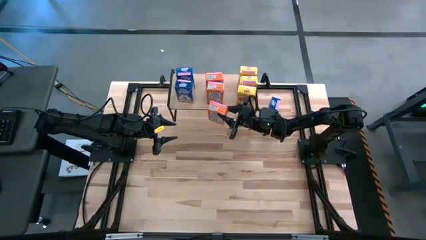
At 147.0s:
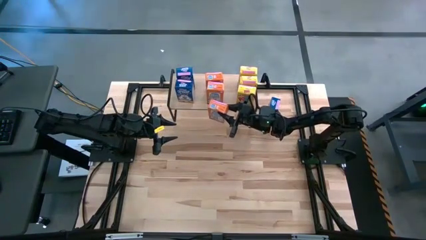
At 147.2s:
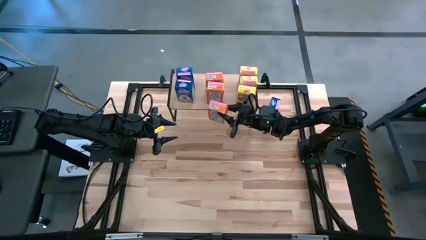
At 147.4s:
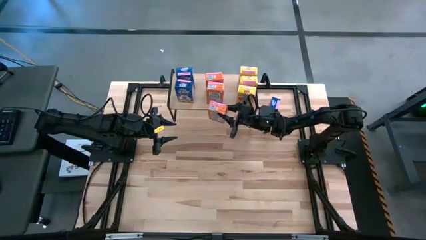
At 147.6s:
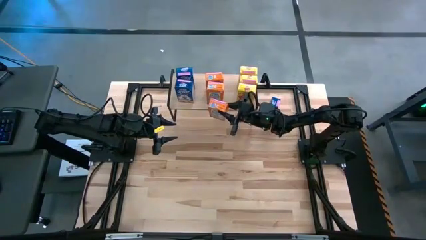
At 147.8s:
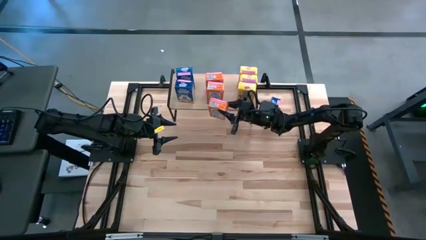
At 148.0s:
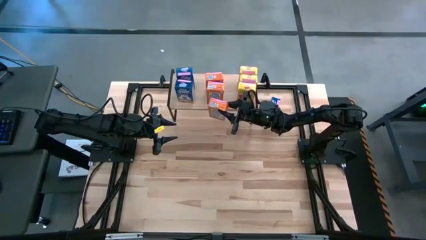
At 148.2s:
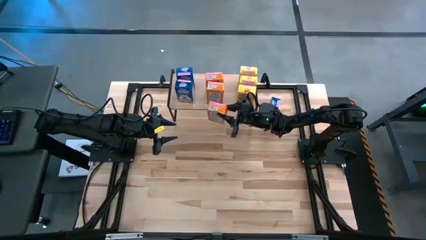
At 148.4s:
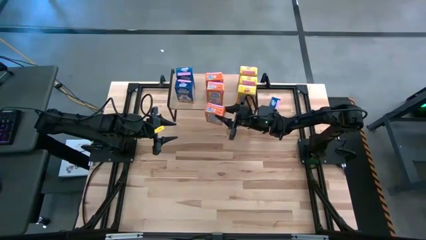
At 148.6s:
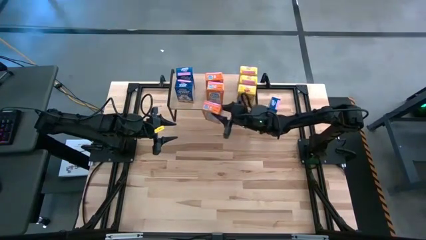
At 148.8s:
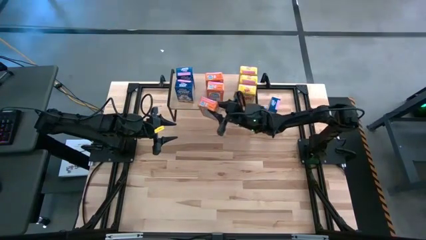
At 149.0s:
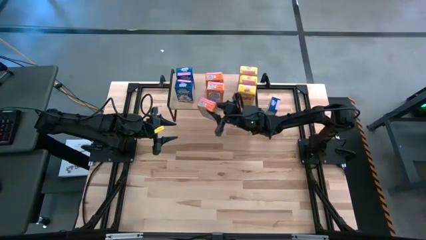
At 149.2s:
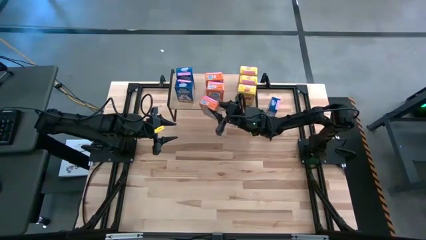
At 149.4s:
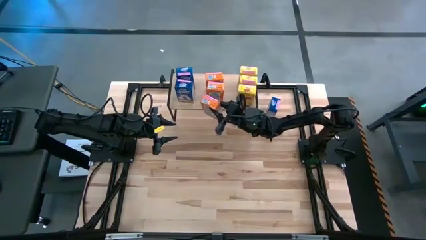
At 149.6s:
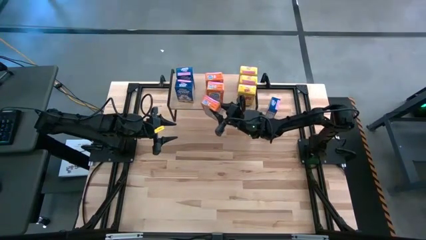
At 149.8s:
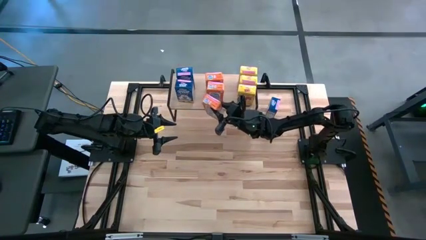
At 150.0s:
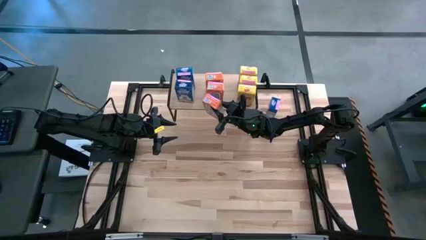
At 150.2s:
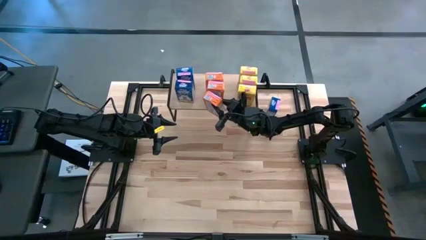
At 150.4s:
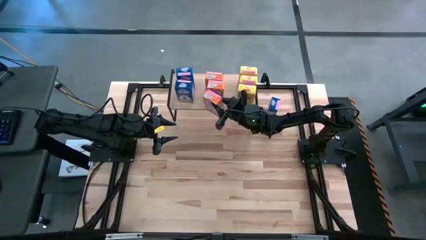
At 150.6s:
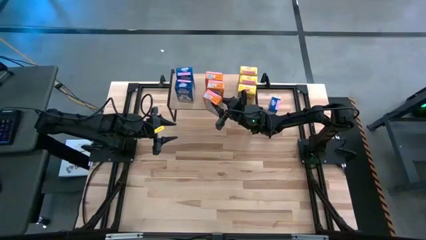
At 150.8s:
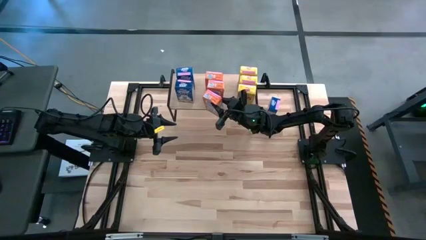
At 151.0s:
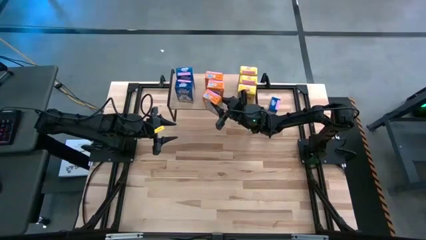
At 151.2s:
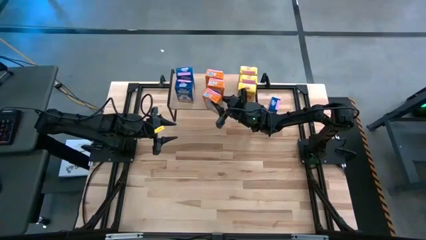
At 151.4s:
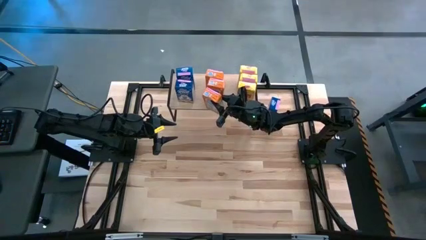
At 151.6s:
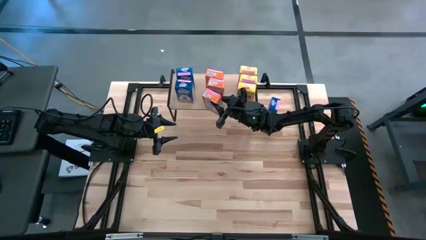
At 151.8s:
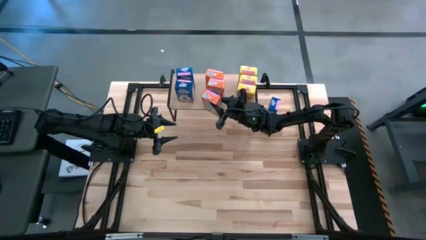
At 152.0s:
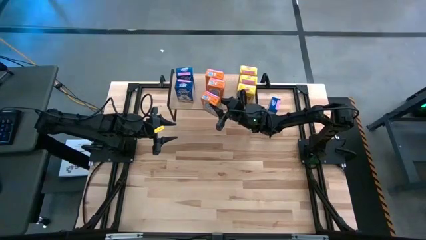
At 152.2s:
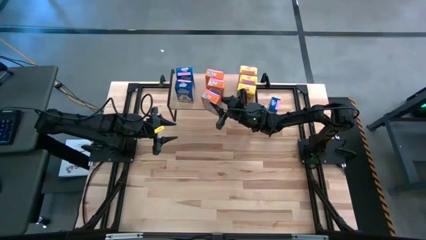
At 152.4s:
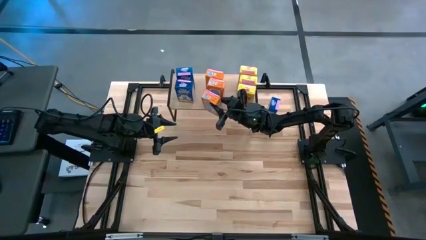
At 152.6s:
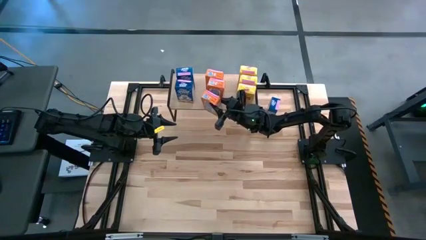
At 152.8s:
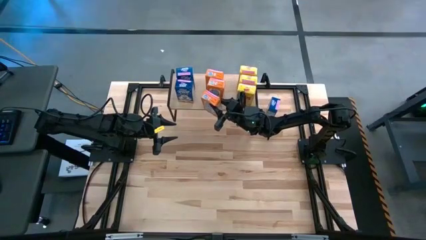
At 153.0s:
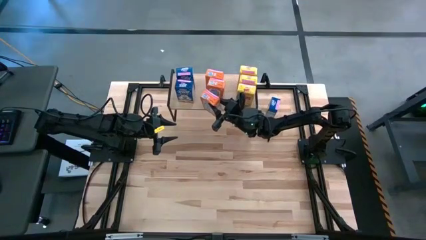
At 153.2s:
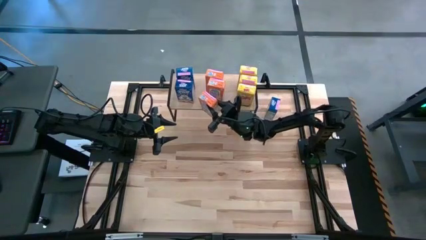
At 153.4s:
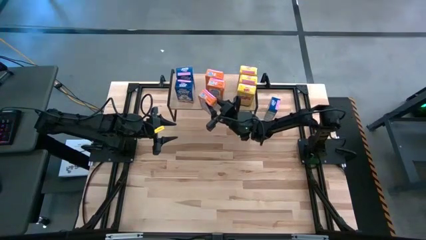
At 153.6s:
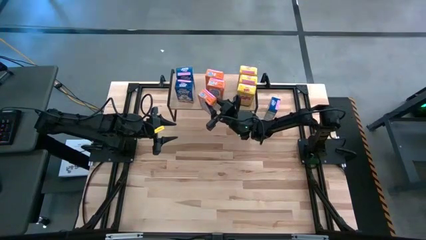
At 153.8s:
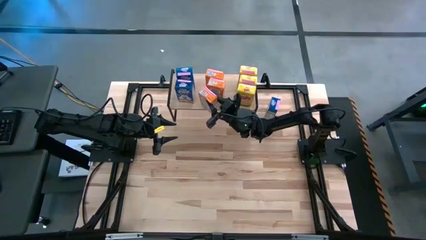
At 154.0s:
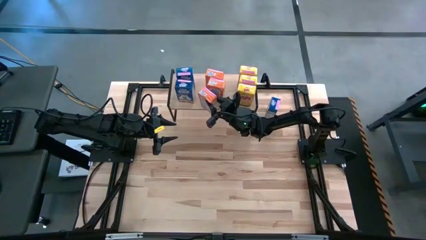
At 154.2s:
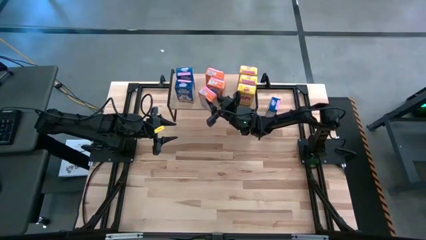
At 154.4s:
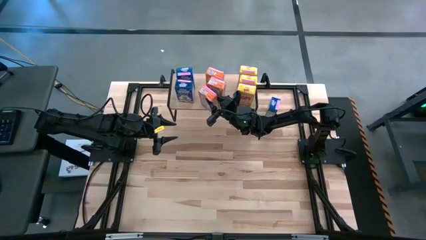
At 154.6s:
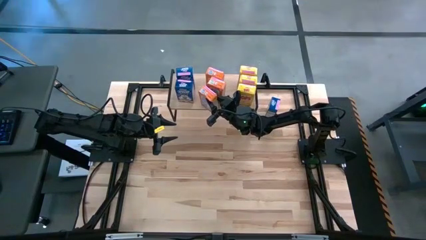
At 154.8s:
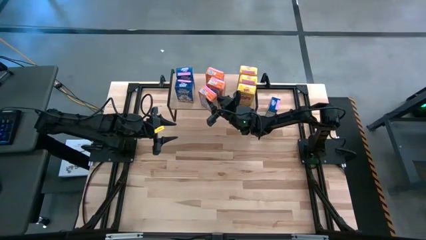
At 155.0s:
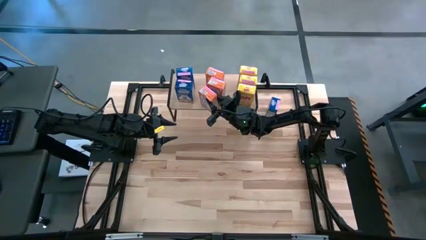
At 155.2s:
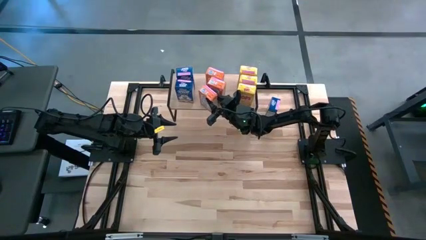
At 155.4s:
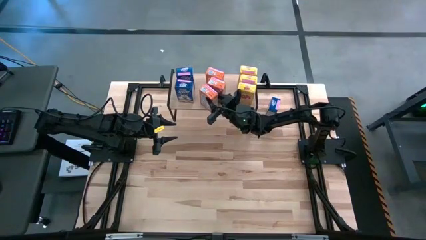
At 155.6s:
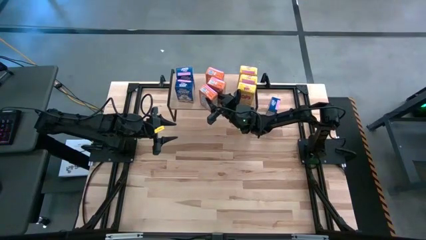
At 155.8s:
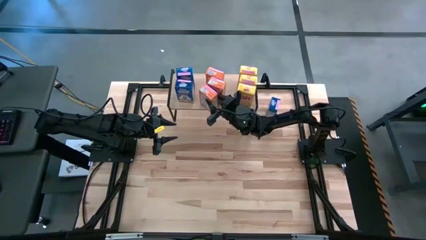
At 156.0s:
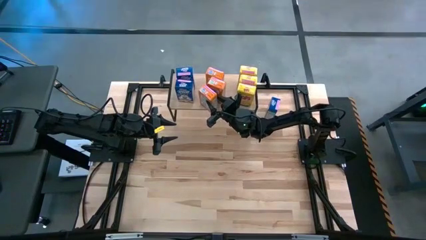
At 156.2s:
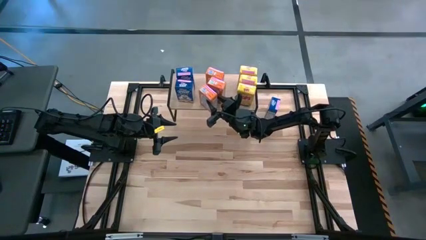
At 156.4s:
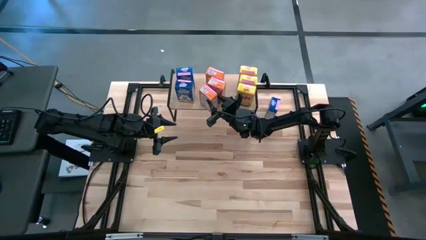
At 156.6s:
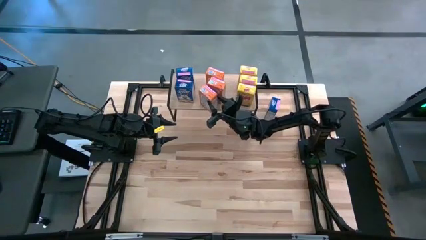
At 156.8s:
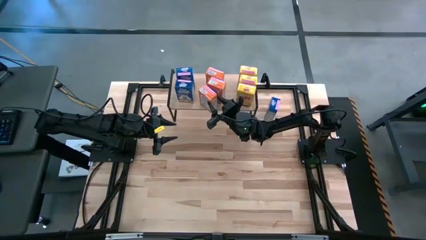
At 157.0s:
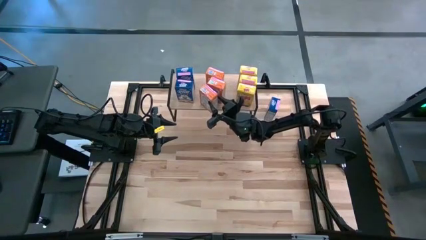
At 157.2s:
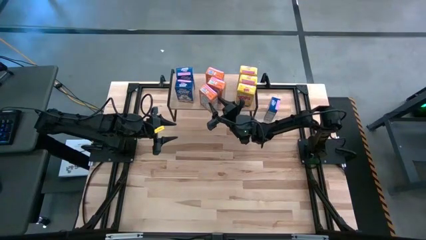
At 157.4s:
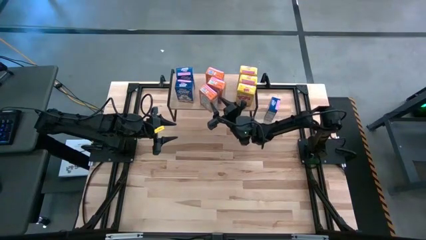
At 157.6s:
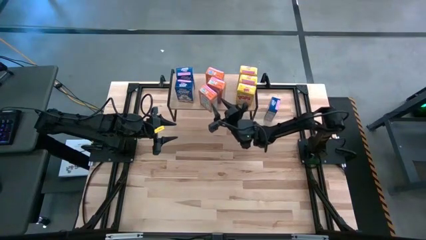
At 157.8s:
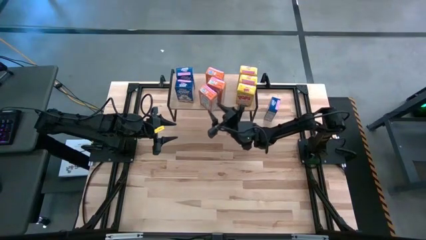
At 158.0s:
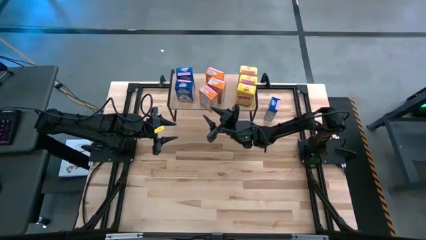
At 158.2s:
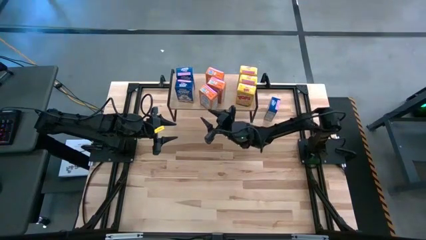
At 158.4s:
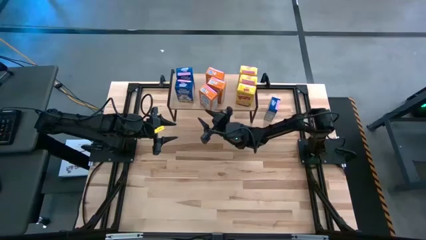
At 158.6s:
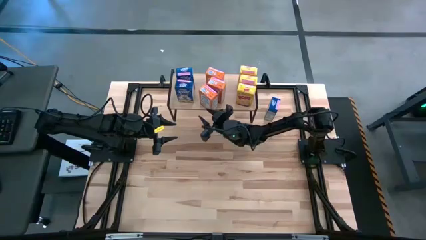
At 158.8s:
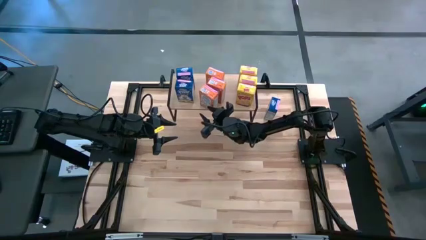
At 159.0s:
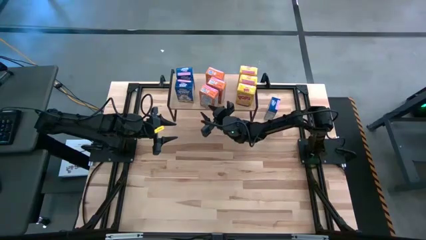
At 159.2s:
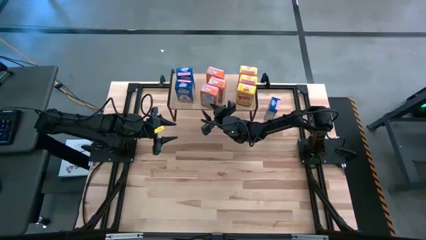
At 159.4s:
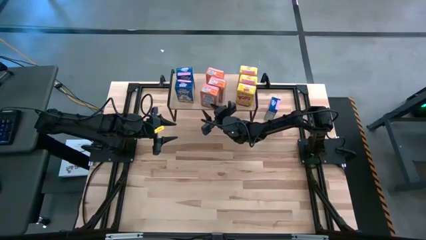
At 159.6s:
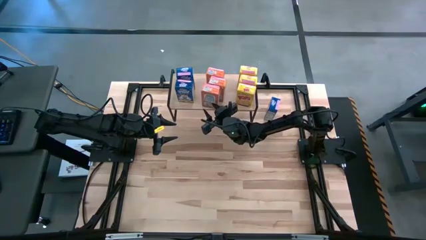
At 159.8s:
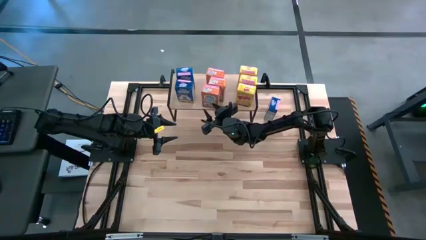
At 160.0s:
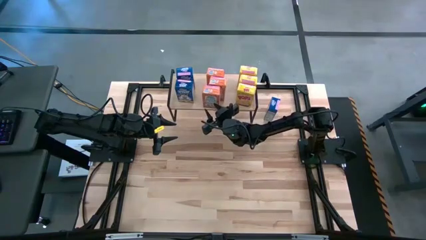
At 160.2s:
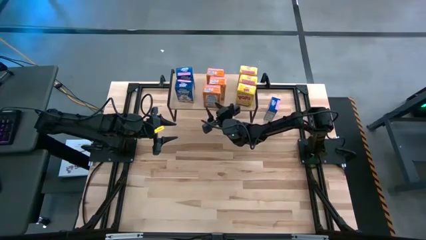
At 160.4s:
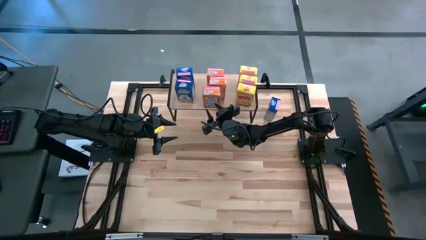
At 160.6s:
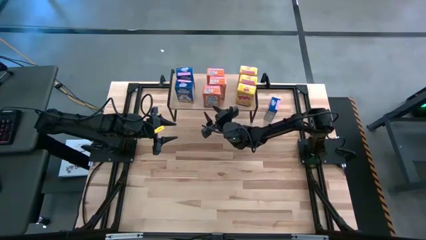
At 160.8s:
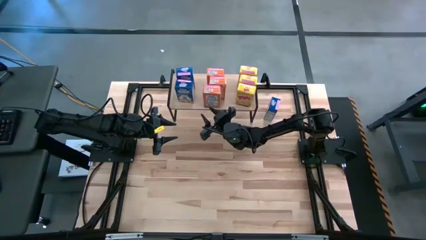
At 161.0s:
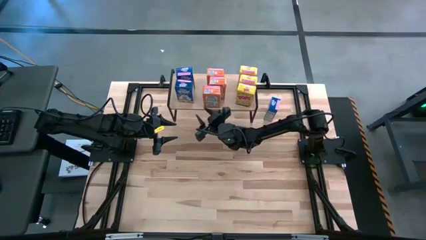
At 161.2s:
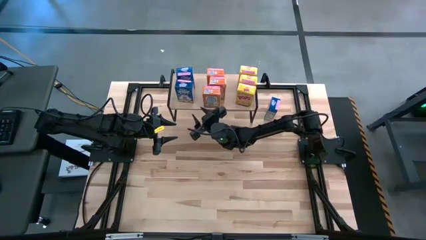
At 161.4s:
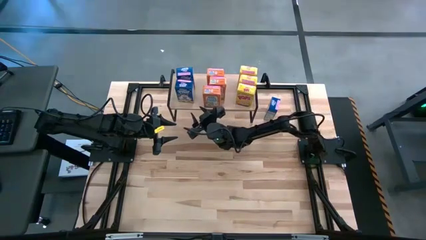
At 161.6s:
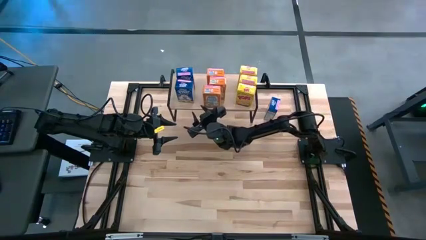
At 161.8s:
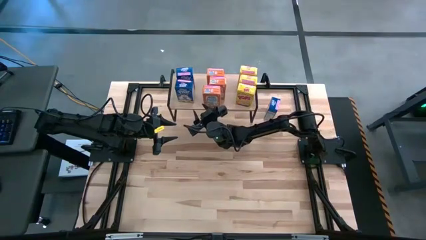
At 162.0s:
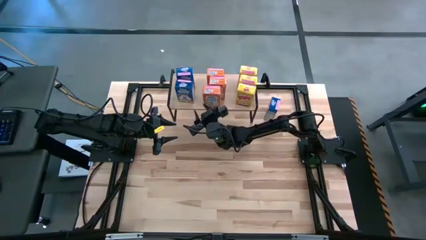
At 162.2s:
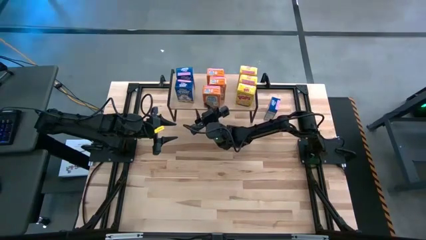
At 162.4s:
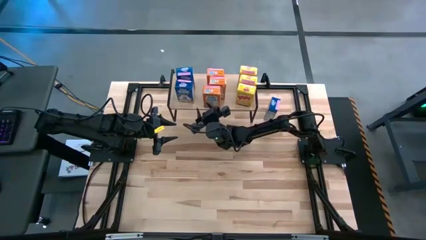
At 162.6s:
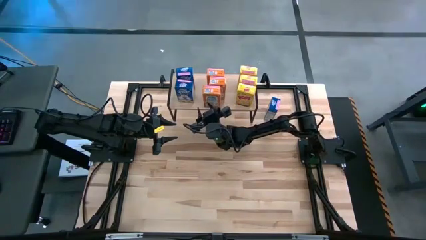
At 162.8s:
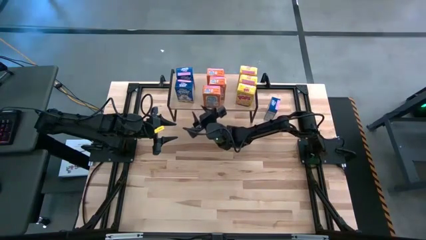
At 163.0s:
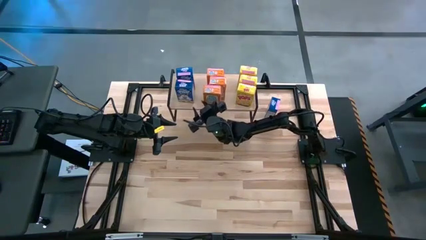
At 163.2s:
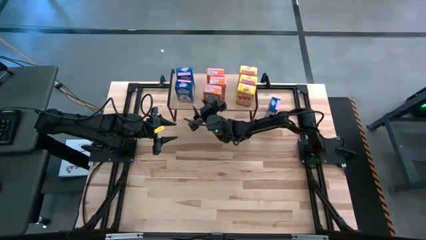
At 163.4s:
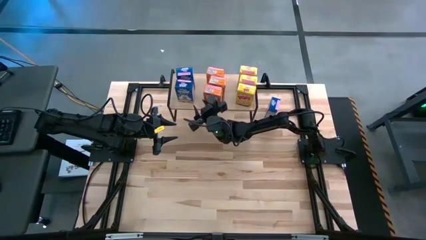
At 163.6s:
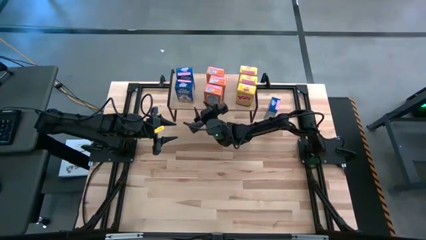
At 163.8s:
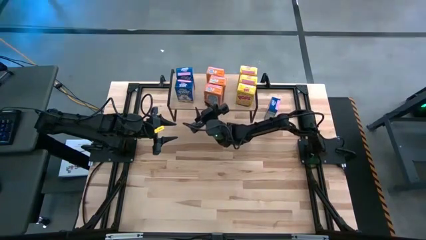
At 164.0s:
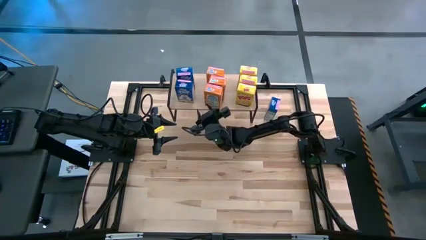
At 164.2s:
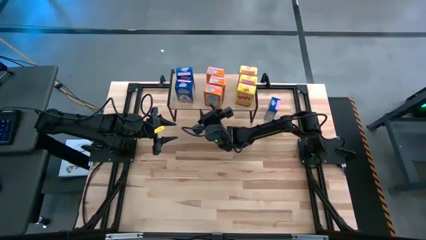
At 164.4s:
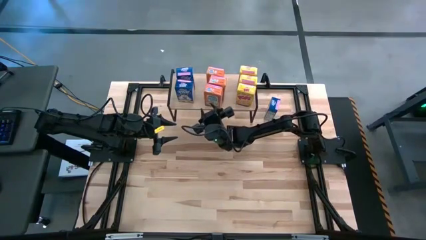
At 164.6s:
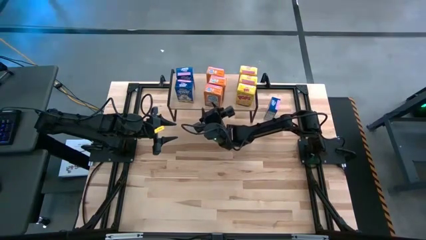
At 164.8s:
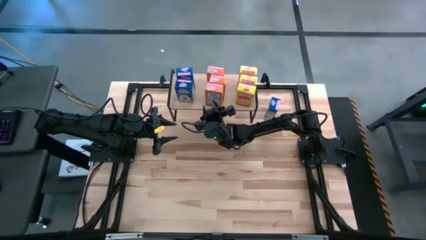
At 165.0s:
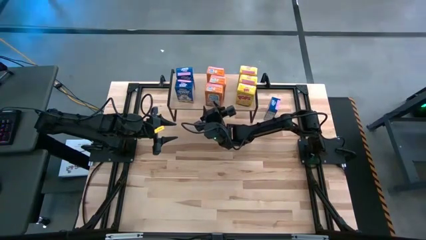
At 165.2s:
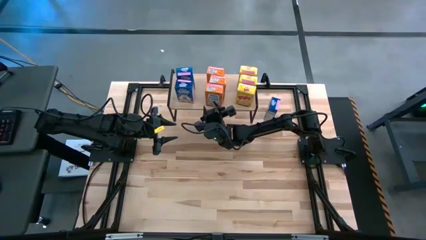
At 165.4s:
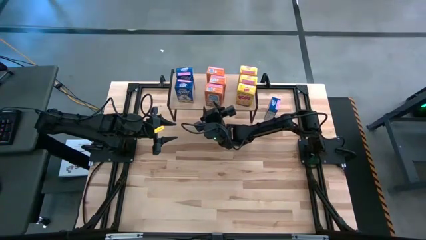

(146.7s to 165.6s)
Task: Stack cereal on shelf
Put the orange cereal box aligned with the other orange cereal boxes on the shelf
